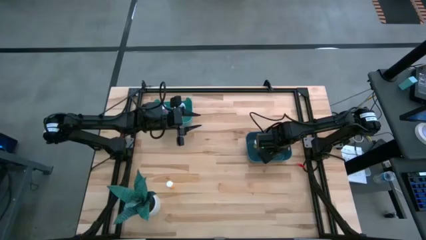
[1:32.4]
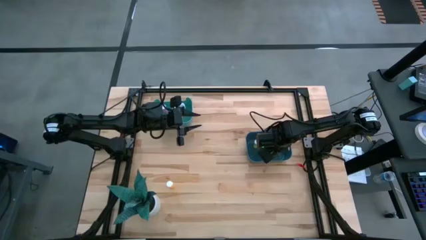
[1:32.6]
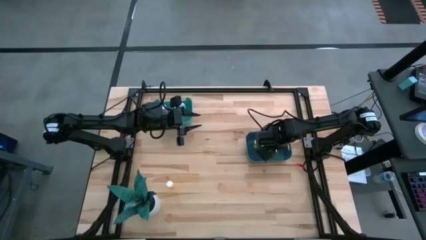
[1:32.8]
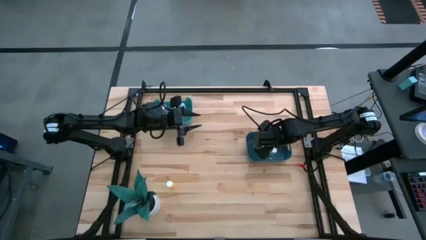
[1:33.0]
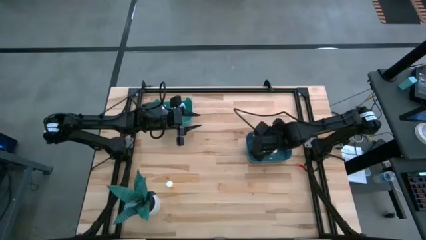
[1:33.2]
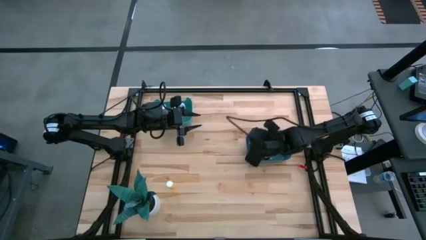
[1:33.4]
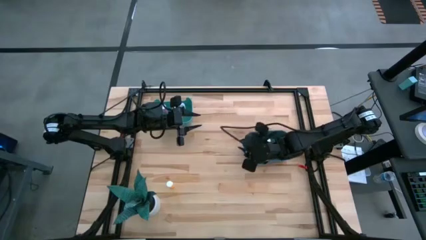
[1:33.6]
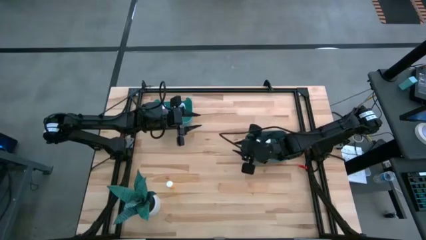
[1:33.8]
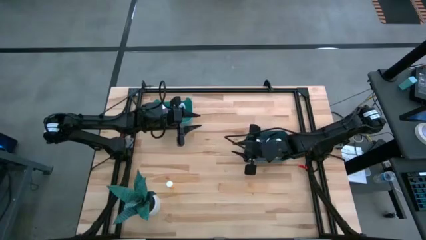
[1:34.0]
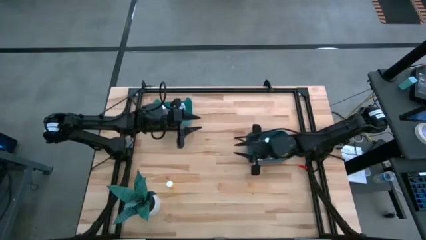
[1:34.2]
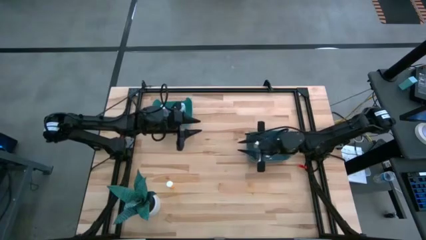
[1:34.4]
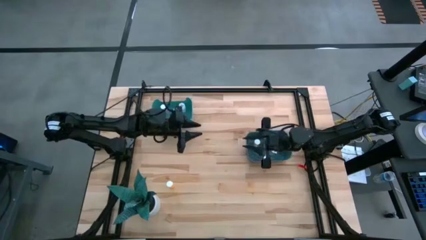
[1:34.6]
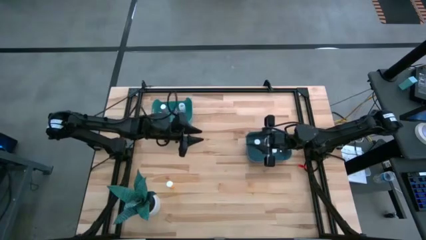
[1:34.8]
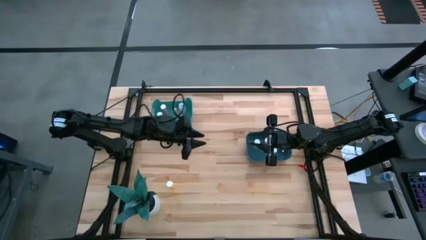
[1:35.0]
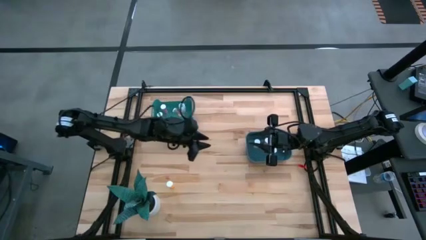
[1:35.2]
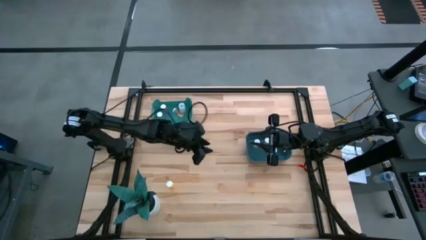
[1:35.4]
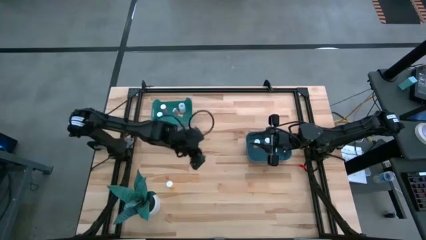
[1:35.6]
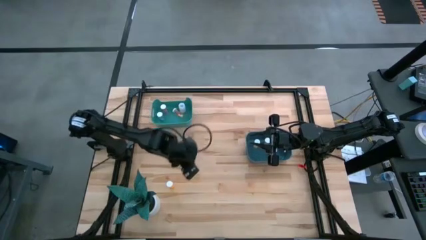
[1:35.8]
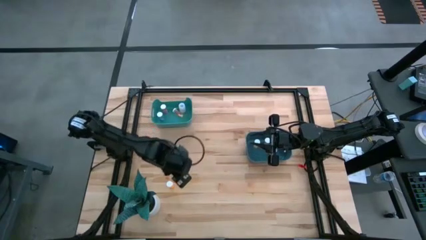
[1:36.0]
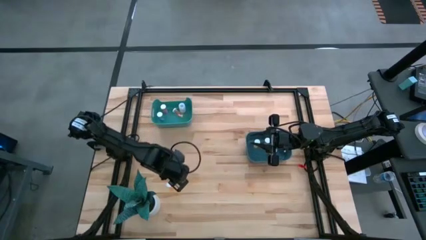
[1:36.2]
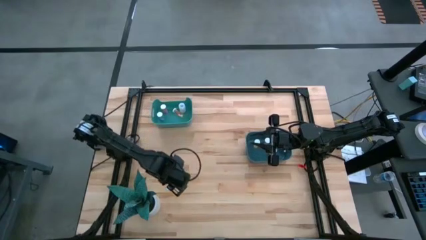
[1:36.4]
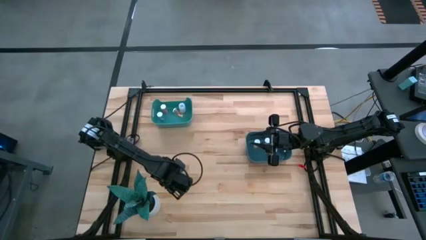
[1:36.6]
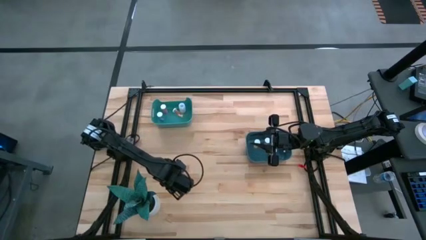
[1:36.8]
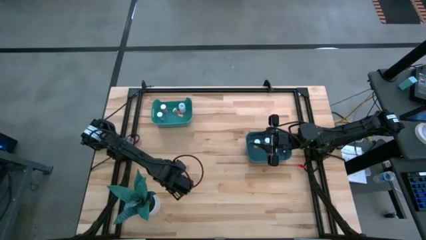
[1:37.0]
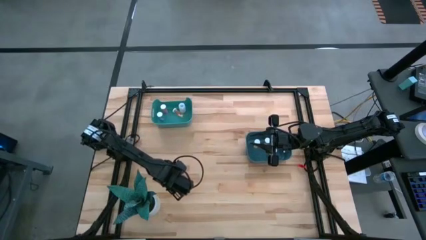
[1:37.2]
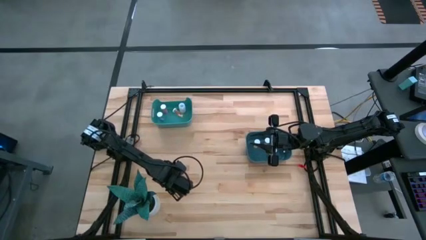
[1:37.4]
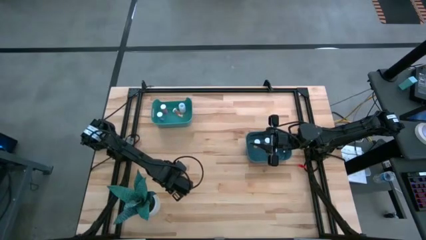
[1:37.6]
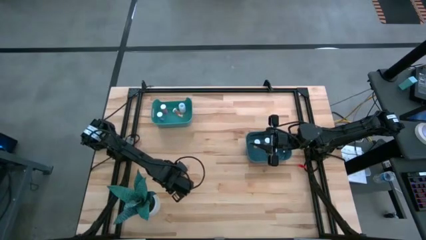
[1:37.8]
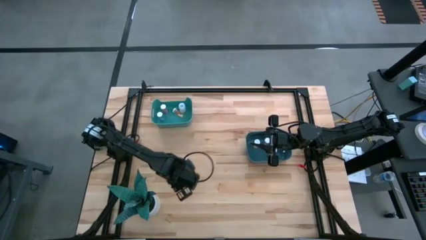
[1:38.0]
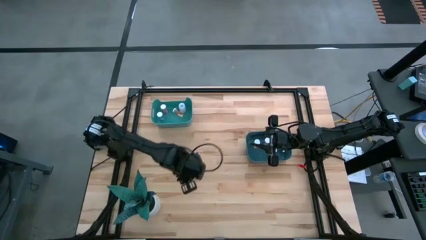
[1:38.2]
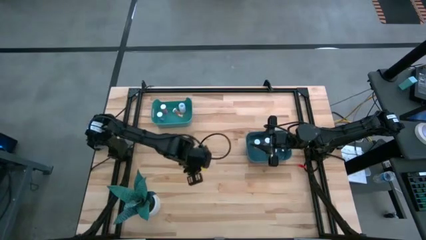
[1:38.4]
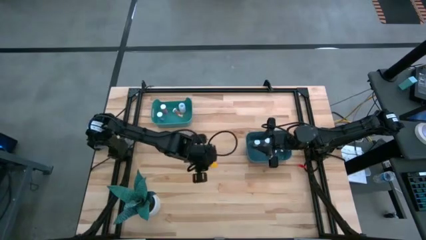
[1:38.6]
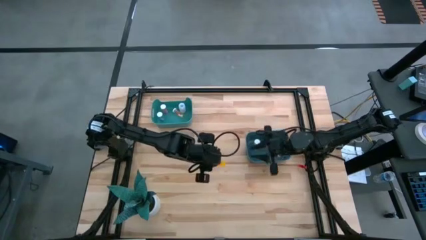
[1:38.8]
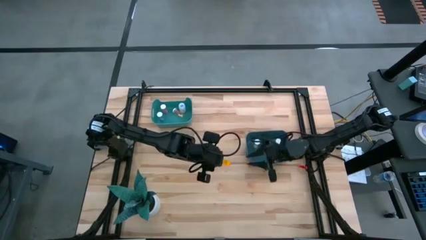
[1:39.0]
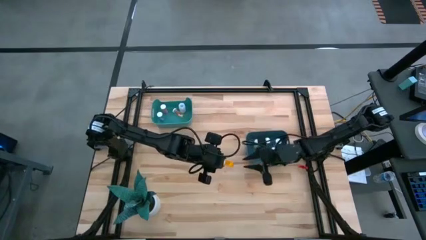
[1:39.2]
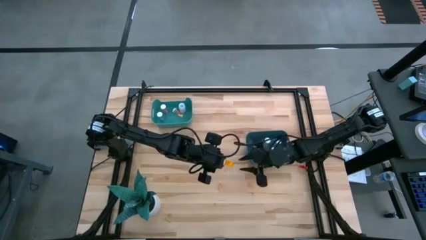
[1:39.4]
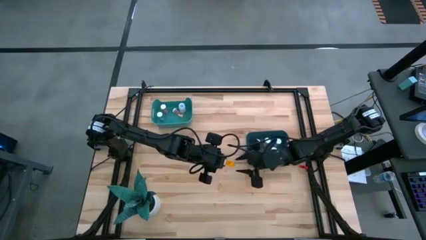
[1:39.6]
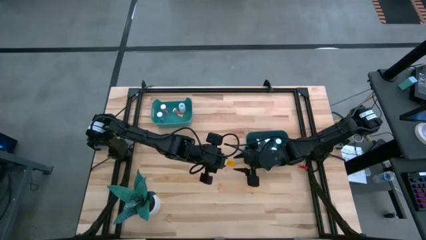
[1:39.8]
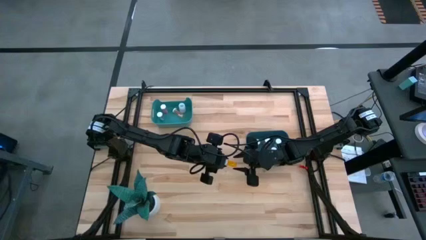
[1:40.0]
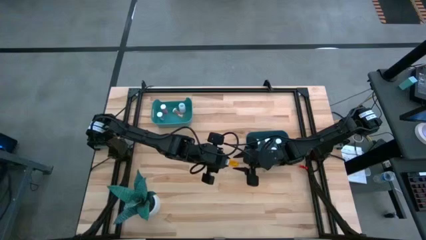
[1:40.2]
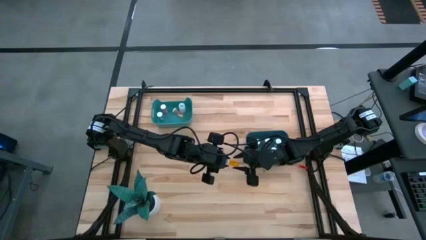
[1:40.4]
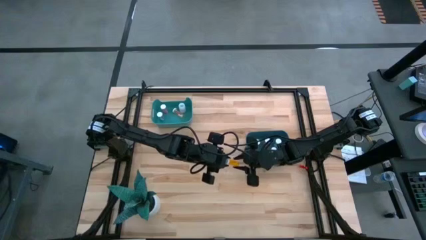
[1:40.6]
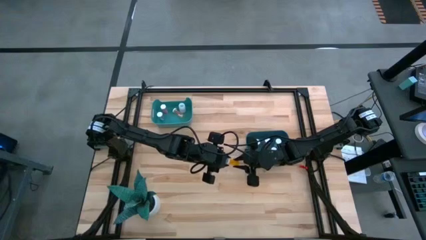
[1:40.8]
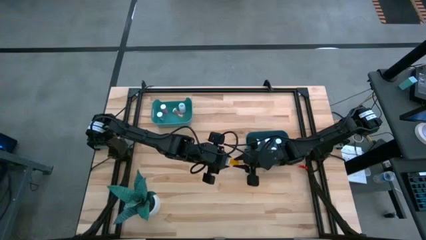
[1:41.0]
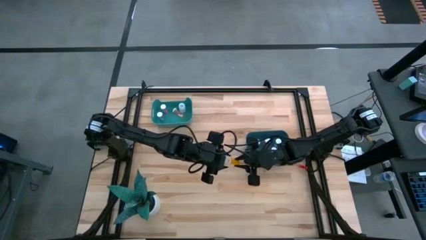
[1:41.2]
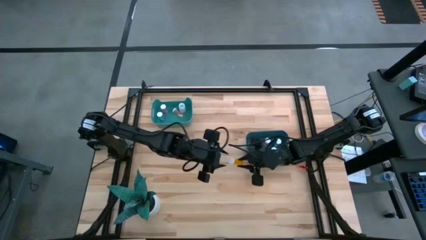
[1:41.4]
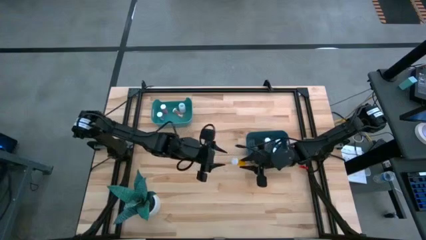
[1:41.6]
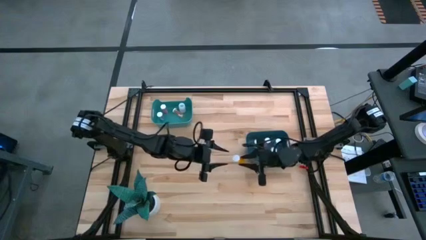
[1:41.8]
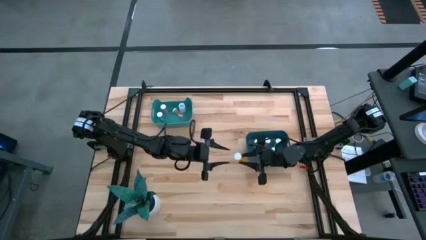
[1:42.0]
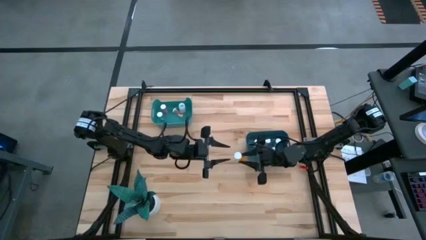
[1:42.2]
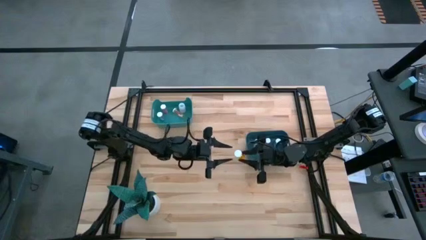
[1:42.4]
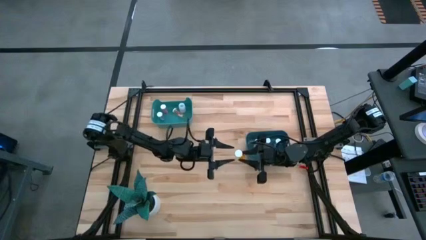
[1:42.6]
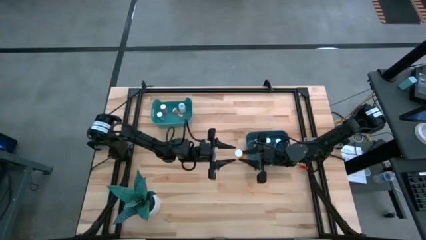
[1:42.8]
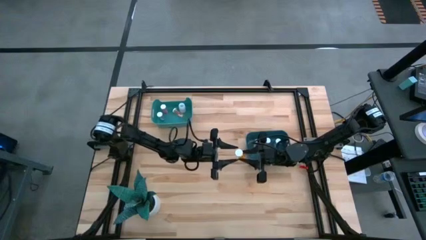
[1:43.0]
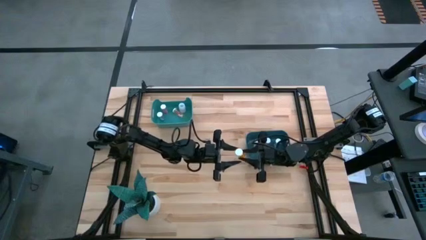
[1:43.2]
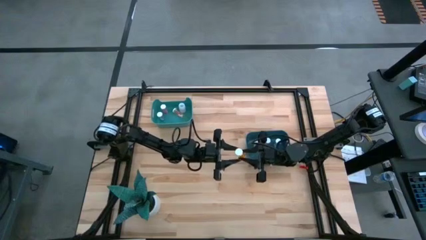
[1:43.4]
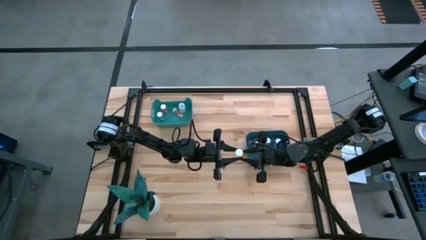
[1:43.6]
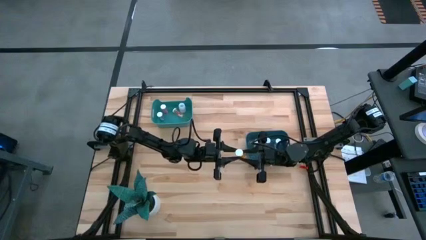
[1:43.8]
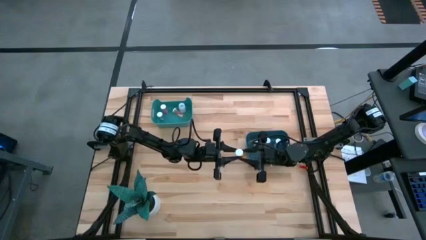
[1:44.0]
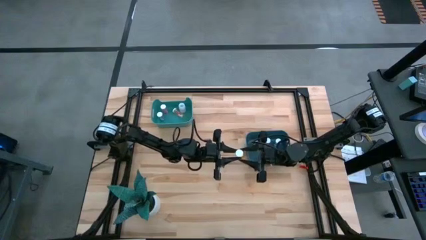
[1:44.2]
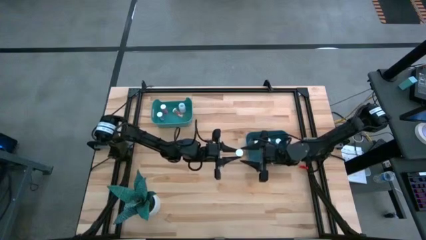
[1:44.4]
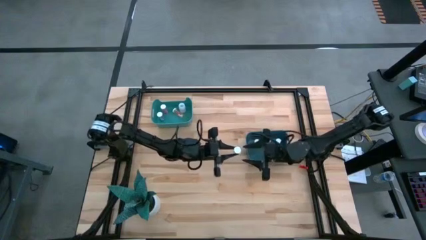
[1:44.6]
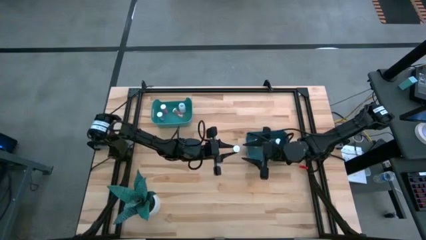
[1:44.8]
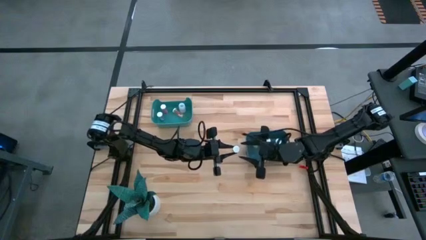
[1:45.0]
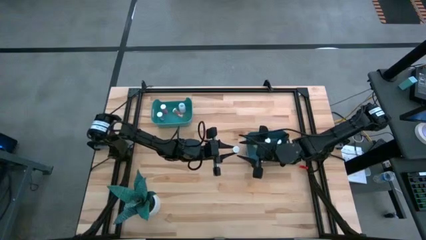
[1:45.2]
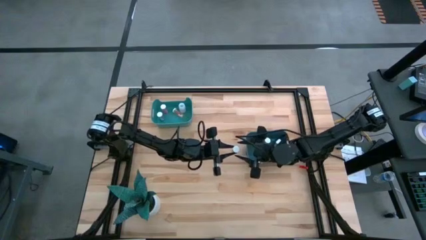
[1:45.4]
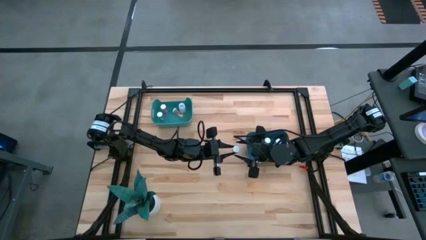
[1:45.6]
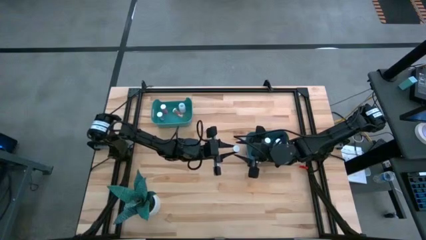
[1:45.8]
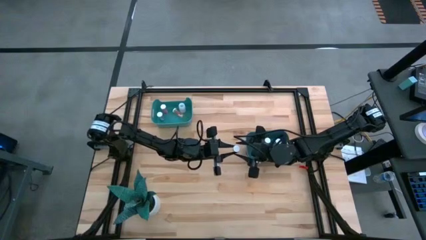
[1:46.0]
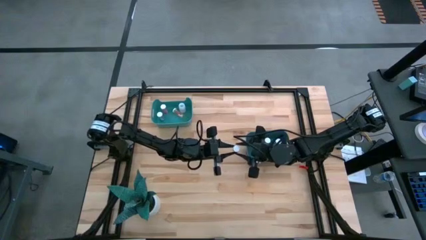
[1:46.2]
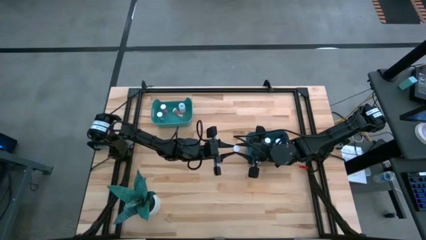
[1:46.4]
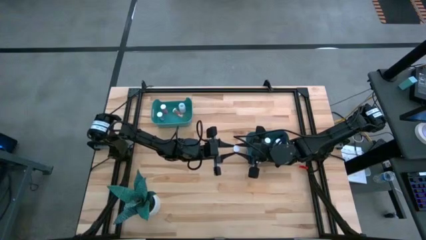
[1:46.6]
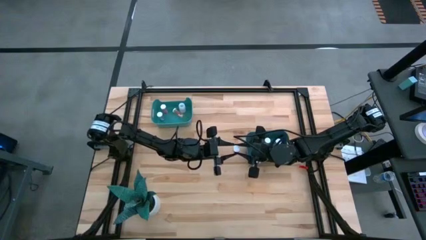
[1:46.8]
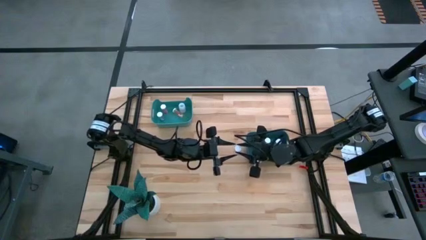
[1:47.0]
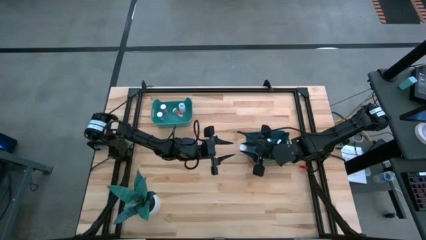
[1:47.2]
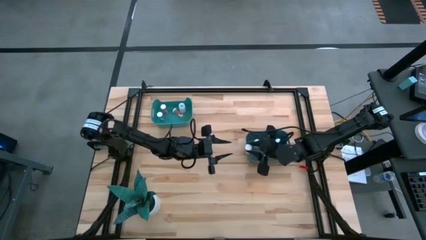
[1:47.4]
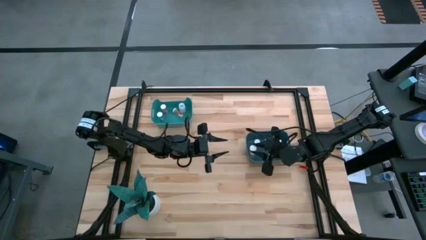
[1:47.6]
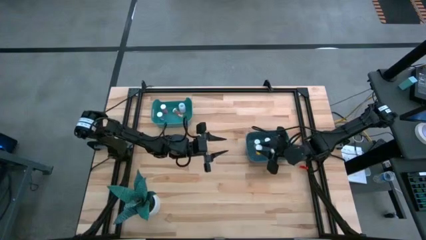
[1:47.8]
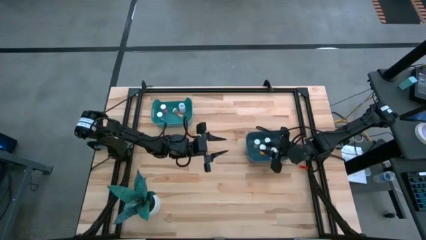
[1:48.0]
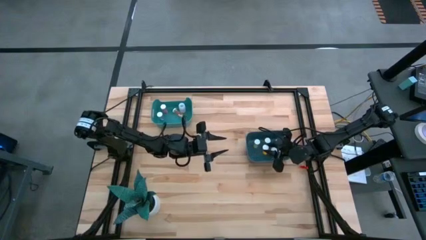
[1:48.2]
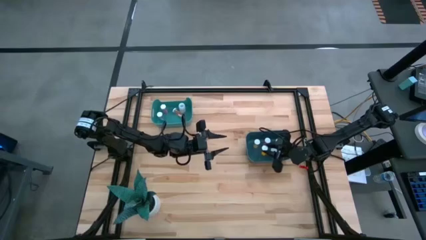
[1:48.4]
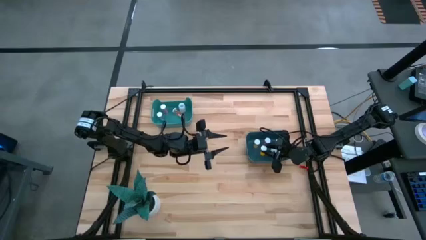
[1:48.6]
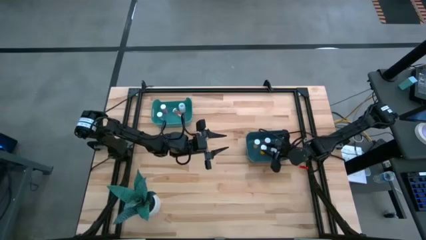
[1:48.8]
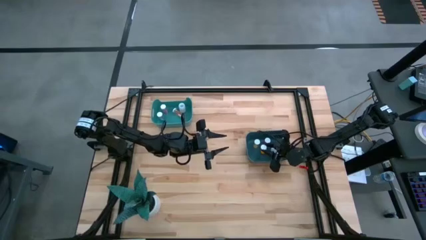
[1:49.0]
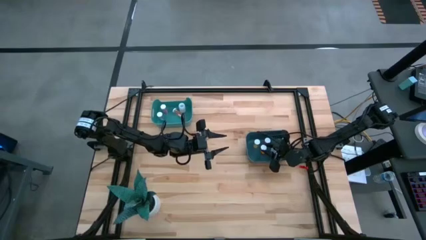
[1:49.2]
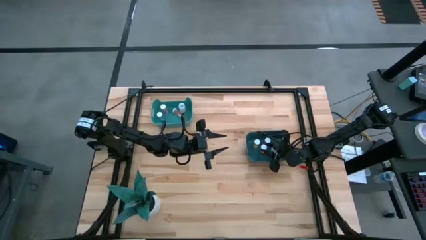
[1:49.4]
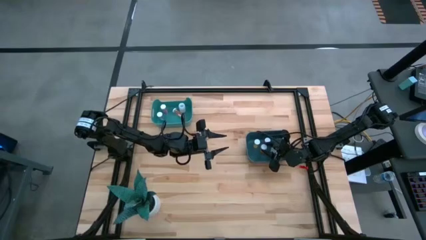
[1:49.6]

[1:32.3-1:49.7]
Task: Pick and place medicine bottles into bin by pill shape (circle, oval)
Put the orange tablet bottle into the blue bin
